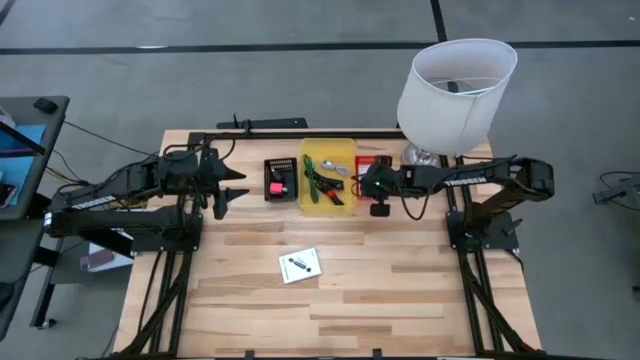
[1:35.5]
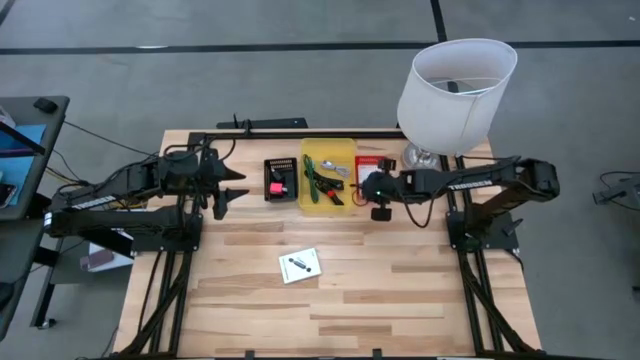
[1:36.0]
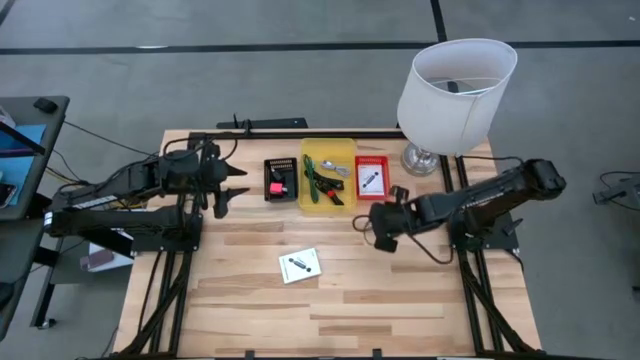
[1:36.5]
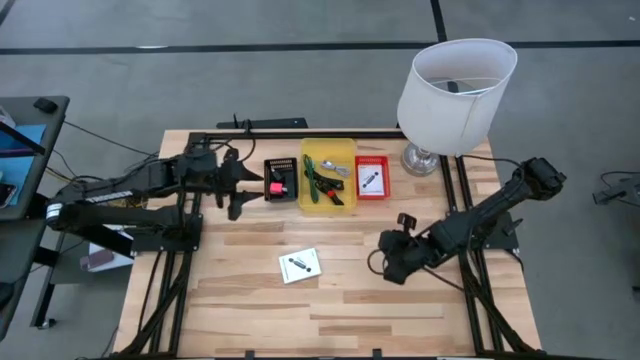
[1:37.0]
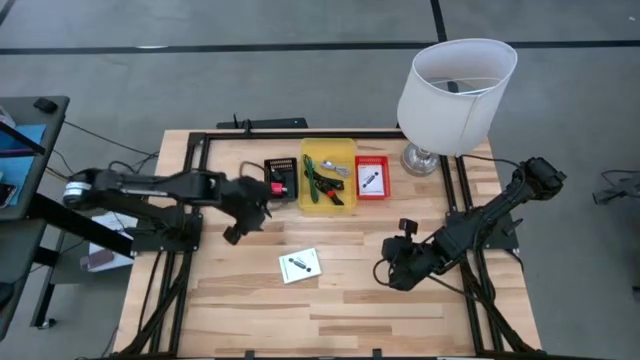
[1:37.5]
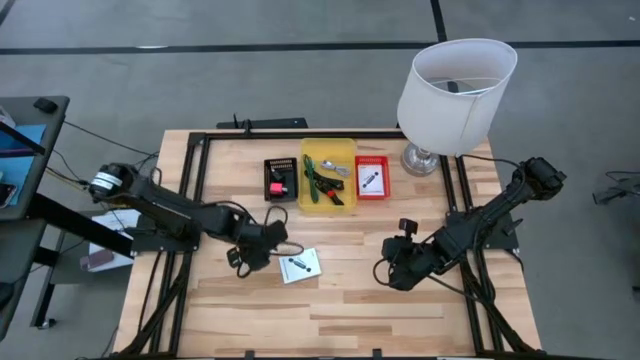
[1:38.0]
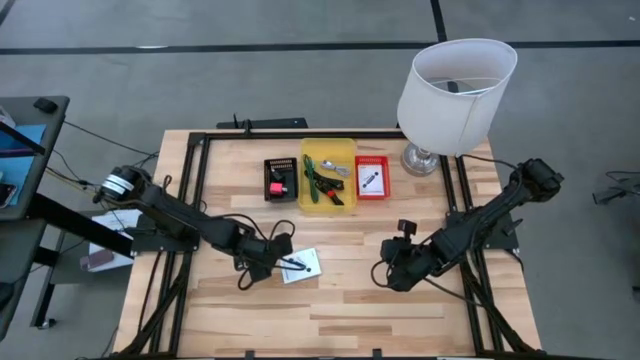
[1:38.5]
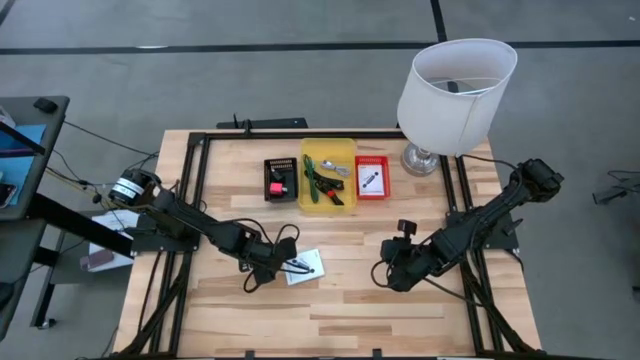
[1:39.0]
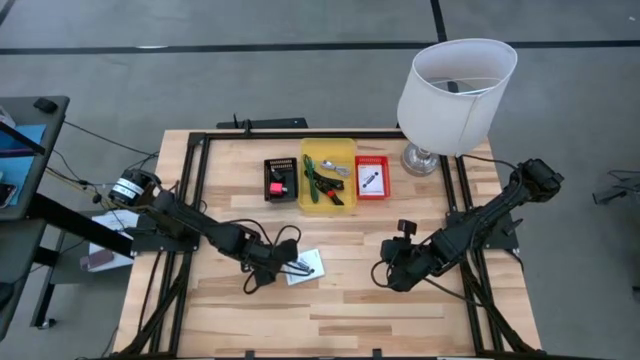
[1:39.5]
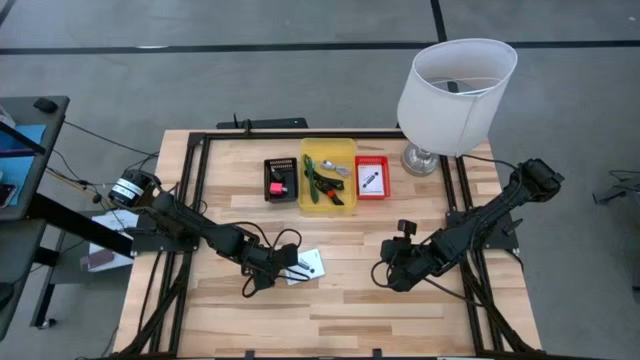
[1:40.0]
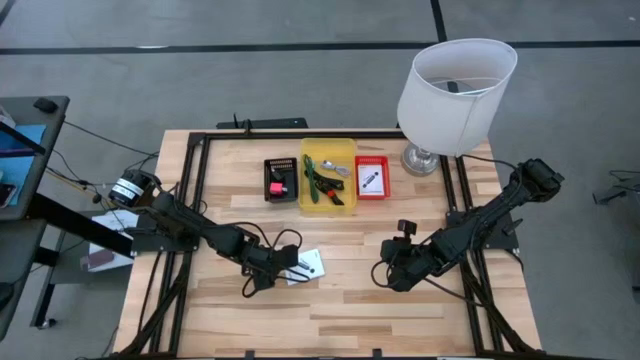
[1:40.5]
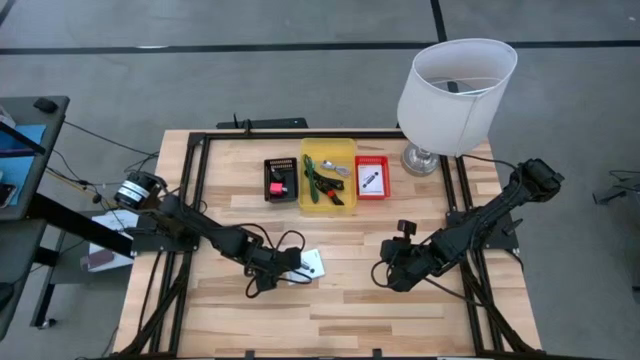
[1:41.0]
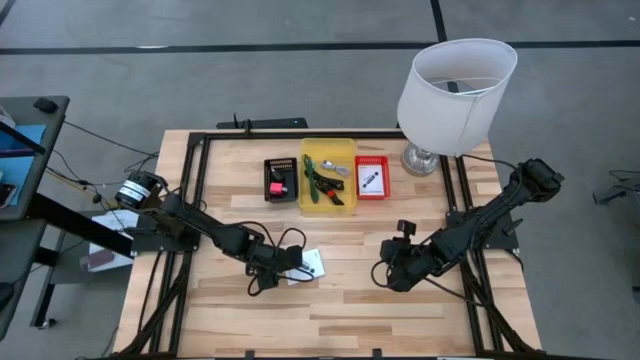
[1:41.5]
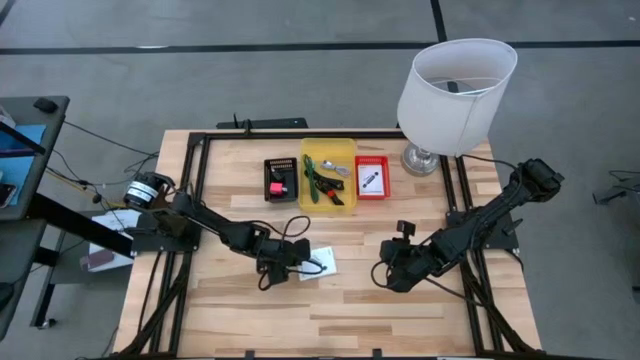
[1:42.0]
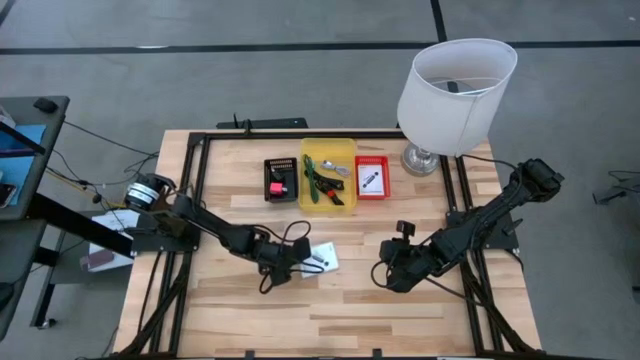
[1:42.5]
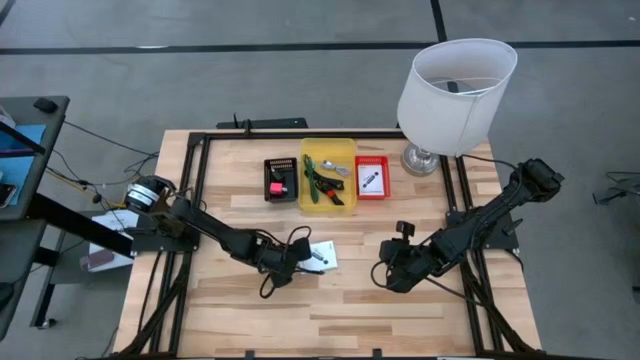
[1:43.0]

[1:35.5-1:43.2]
Task: Pick and place items into bin
Put the white card reader box into the red bin

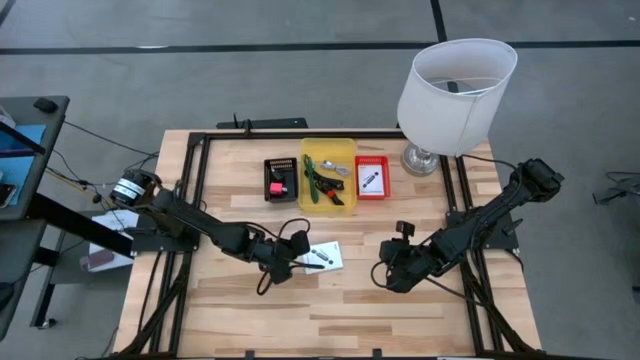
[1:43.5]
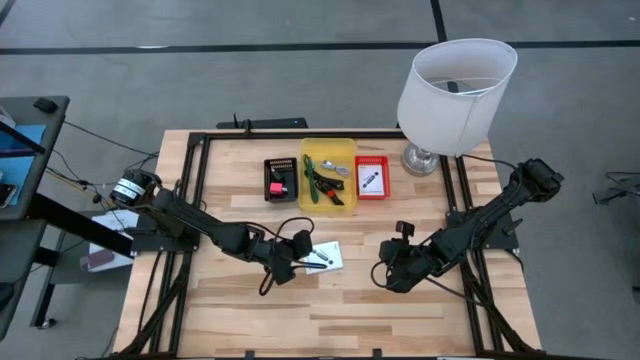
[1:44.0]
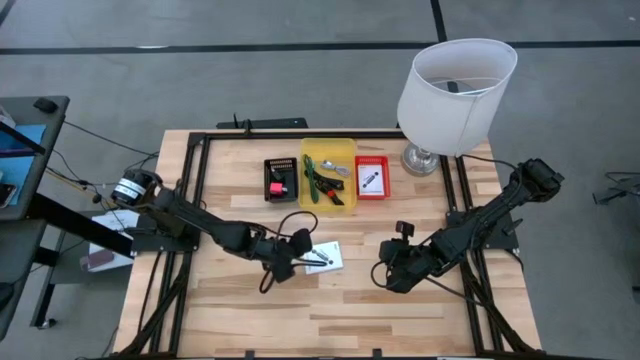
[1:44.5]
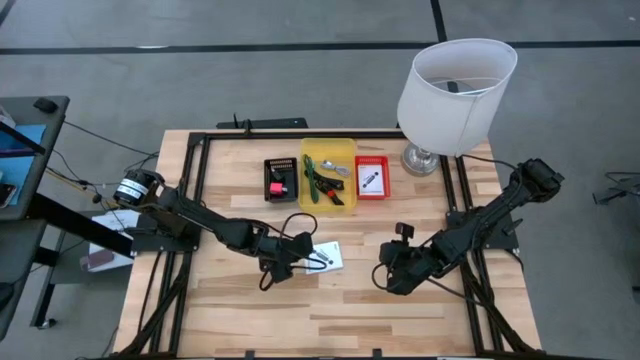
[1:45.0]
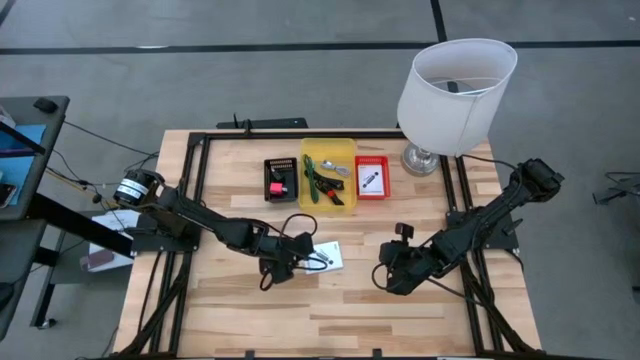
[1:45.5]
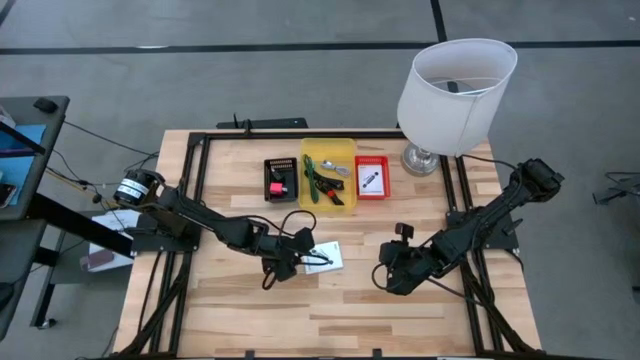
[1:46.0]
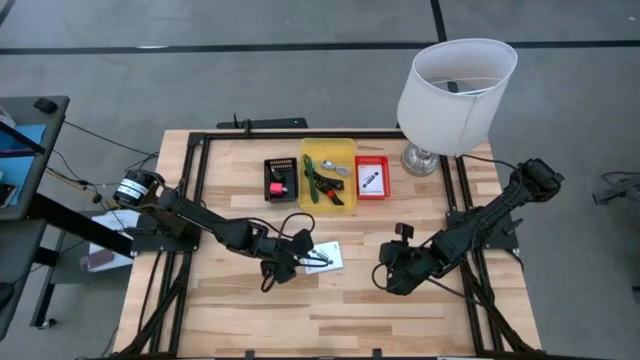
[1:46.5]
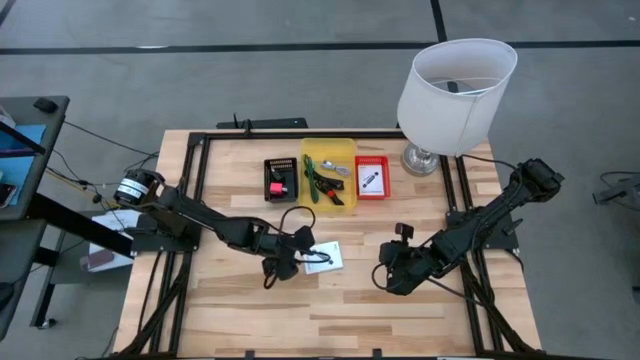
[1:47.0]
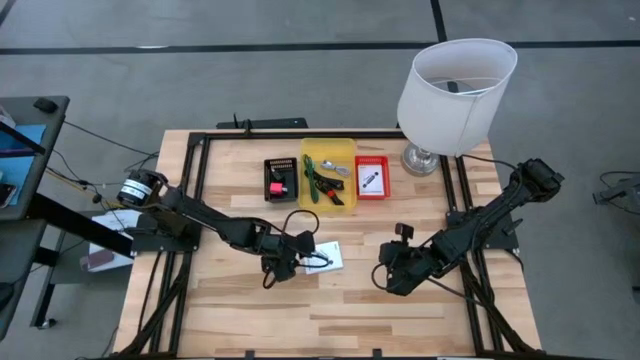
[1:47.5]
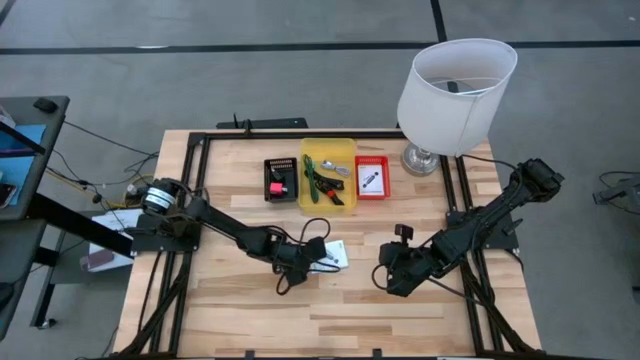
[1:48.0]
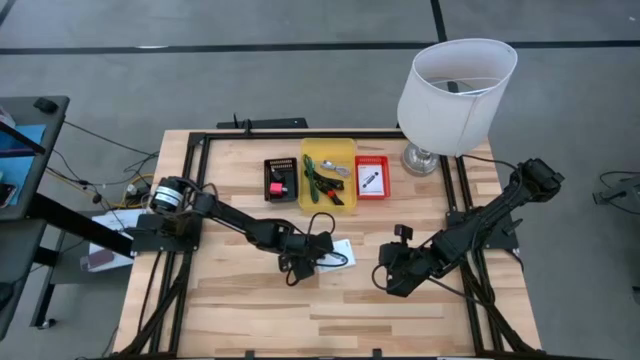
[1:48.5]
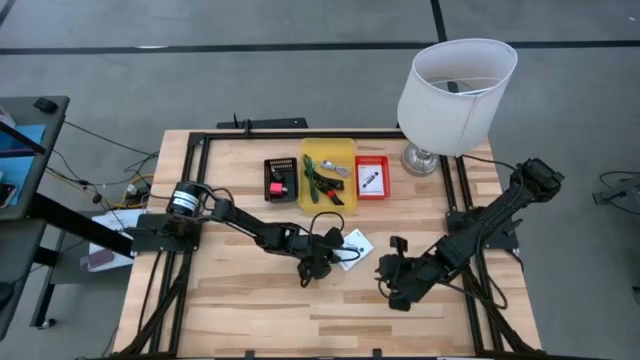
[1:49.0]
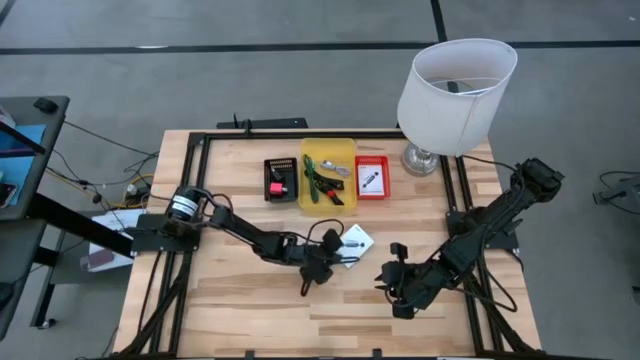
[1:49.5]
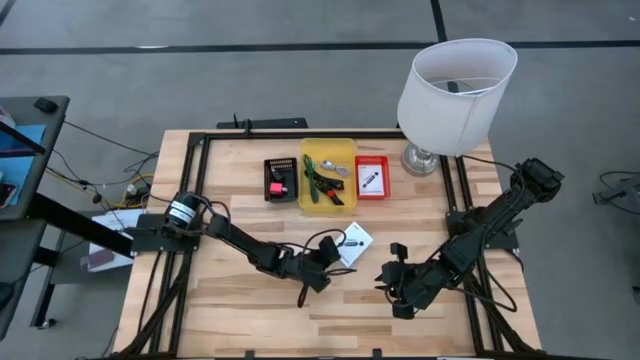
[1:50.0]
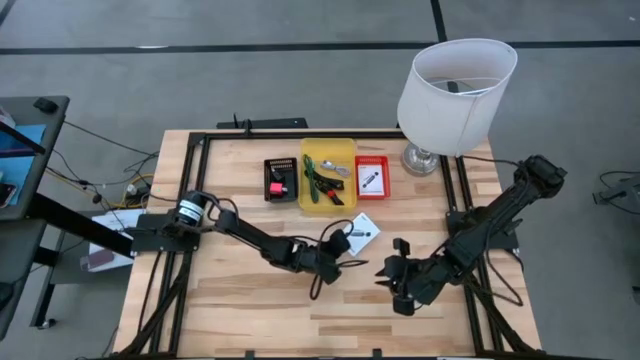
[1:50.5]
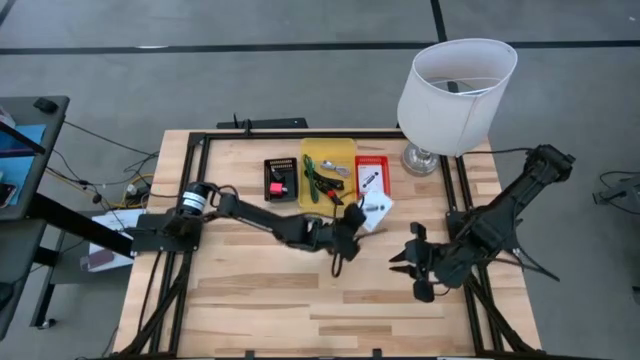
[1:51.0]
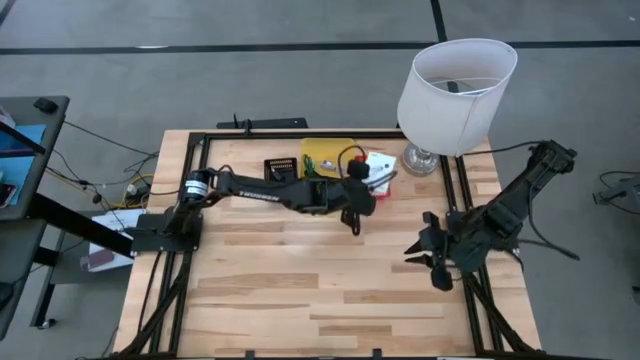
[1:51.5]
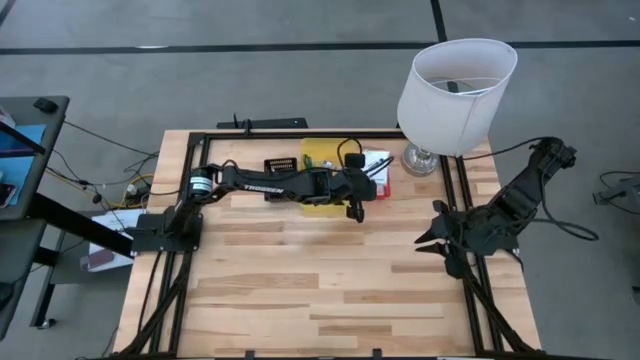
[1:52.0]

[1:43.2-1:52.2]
Put the white card reader box into the red bin

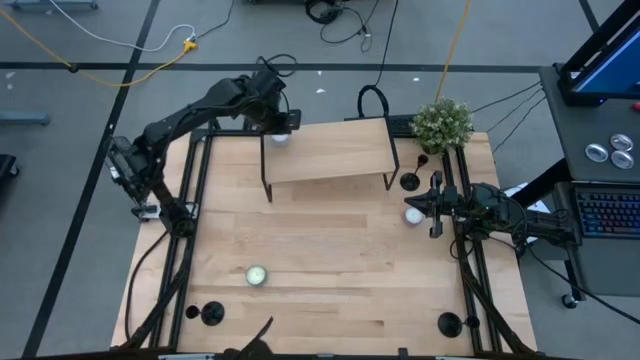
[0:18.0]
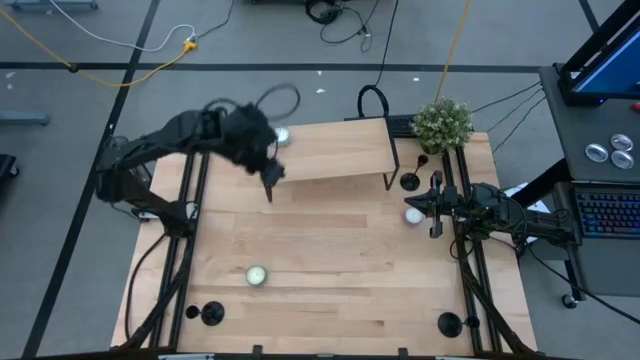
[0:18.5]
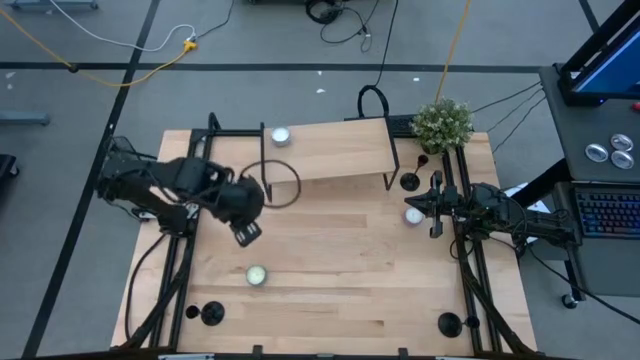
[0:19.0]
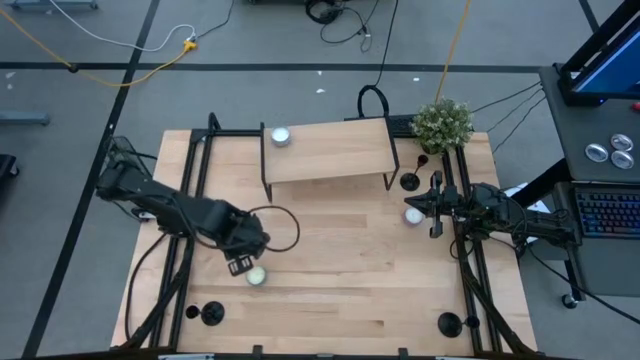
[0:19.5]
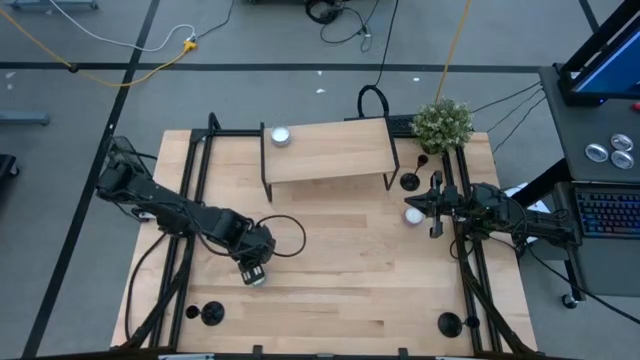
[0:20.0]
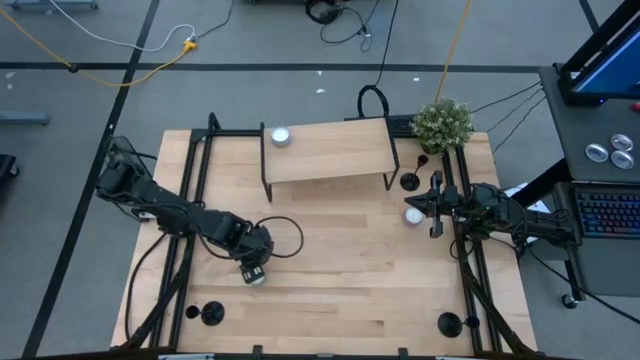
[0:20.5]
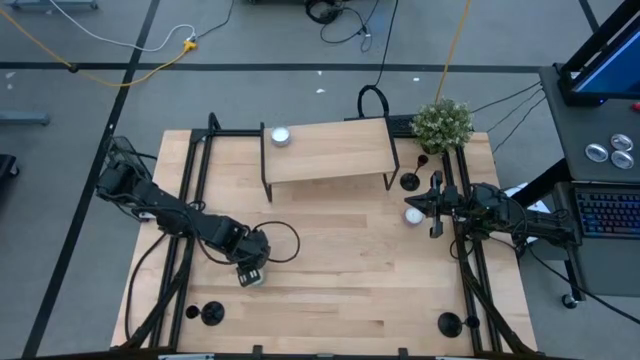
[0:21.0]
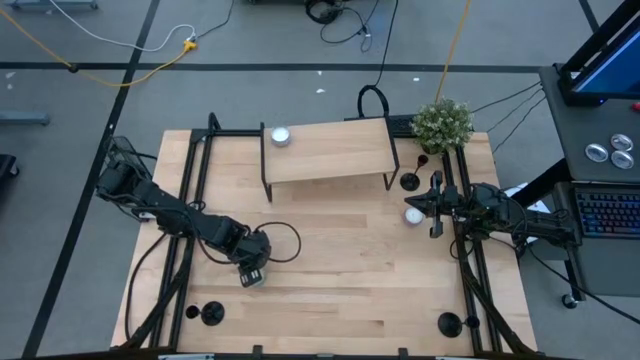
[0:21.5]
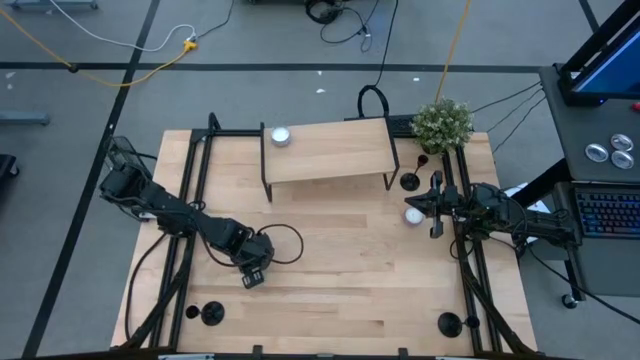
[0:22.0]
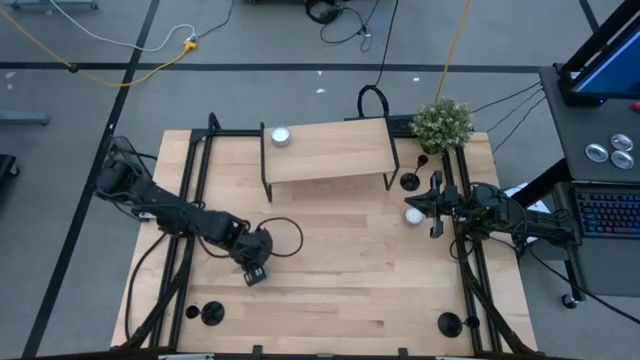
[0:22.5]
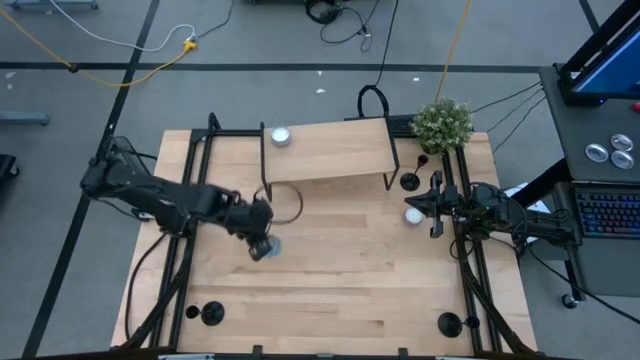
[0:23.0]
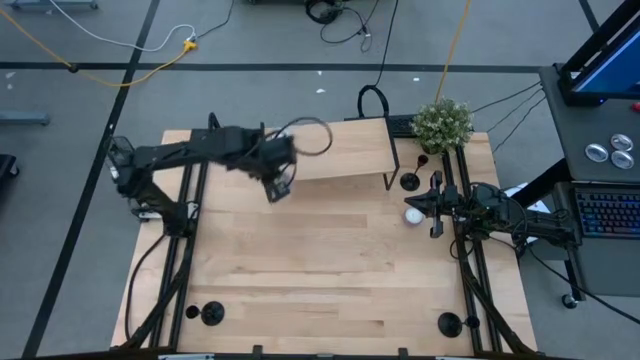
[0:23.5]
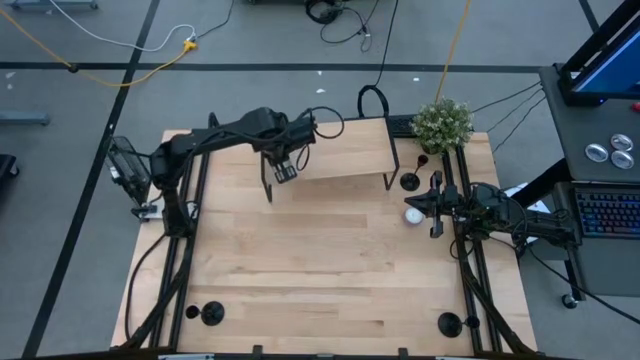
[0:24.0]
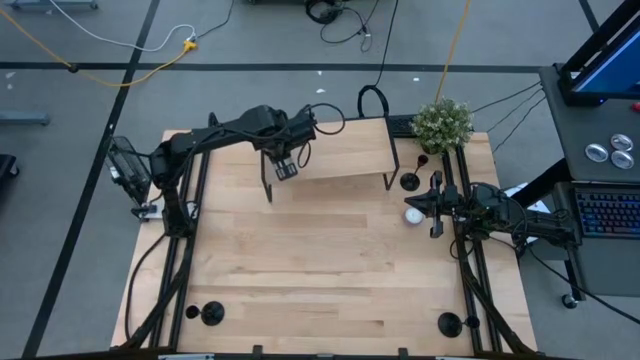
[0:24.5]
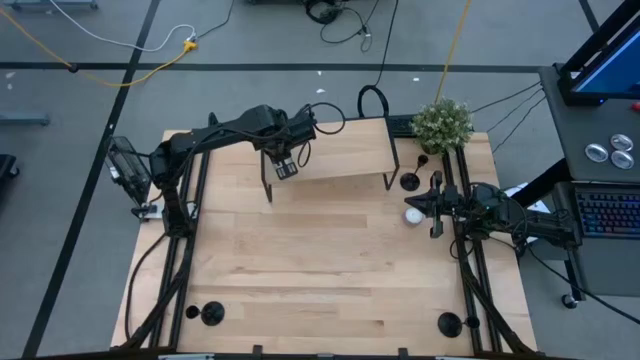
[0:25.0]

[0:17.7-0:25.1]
Task: Pick & Place candle stick holders
Put the green and white scented candle on the shelf
